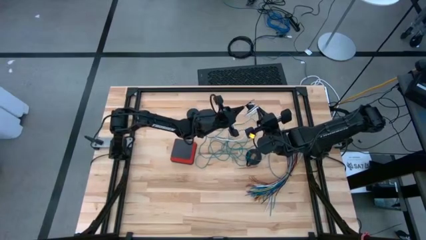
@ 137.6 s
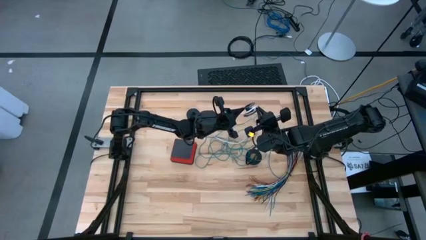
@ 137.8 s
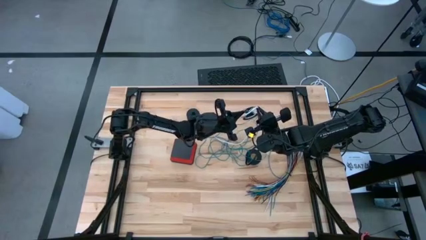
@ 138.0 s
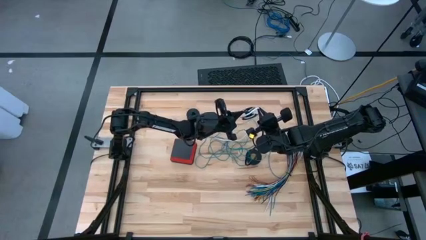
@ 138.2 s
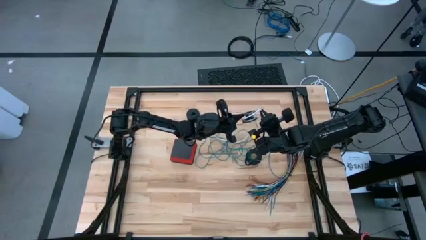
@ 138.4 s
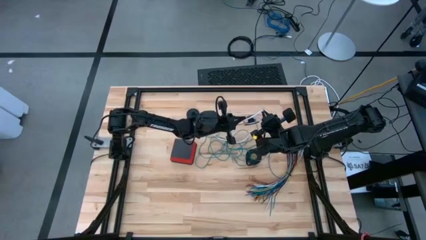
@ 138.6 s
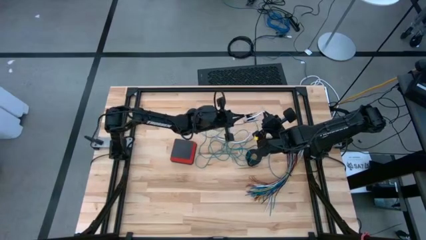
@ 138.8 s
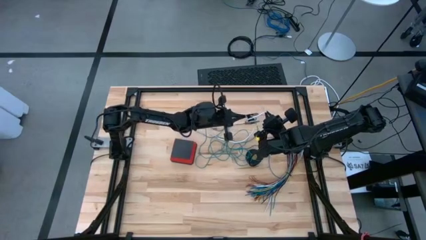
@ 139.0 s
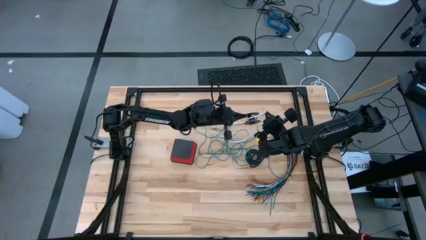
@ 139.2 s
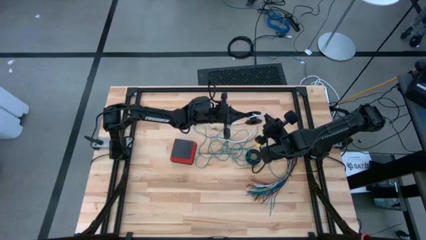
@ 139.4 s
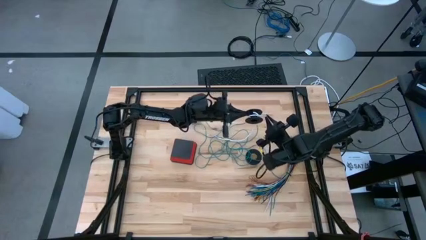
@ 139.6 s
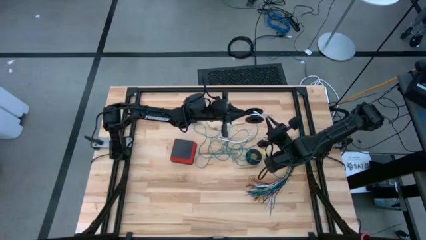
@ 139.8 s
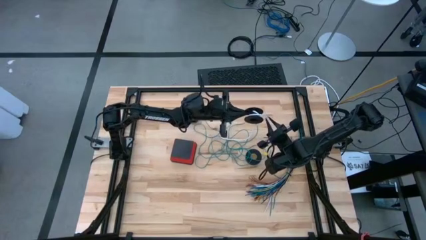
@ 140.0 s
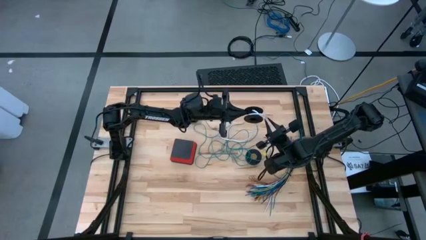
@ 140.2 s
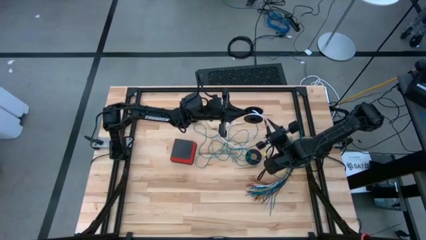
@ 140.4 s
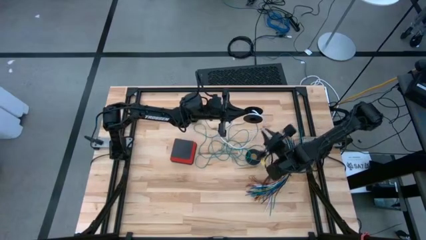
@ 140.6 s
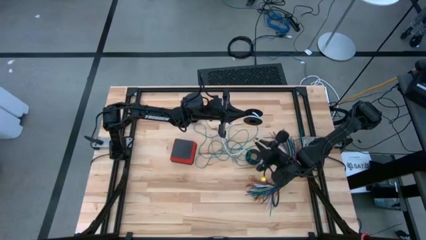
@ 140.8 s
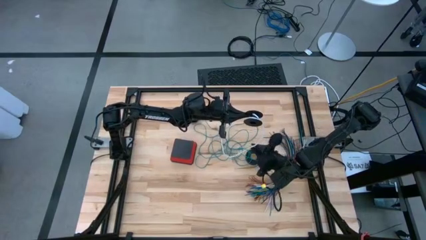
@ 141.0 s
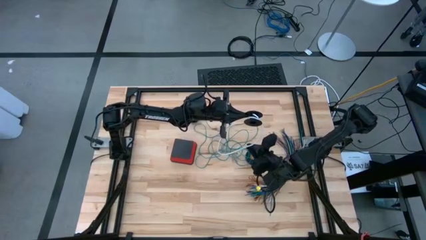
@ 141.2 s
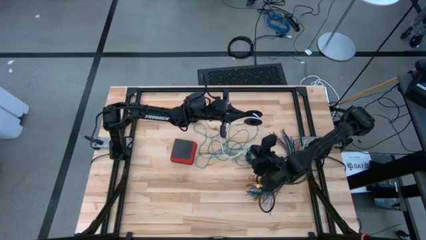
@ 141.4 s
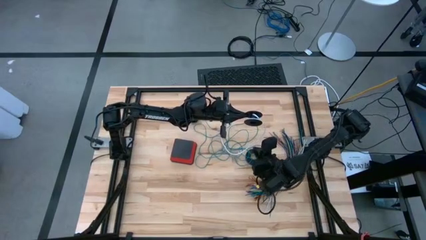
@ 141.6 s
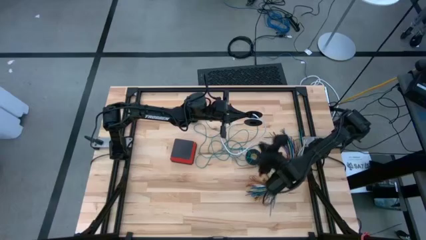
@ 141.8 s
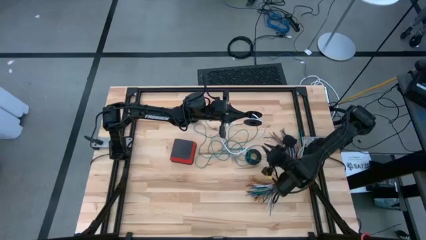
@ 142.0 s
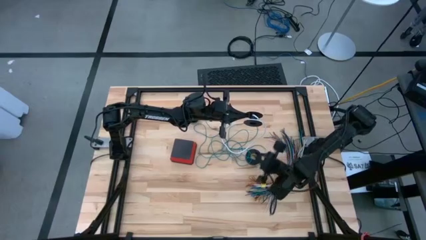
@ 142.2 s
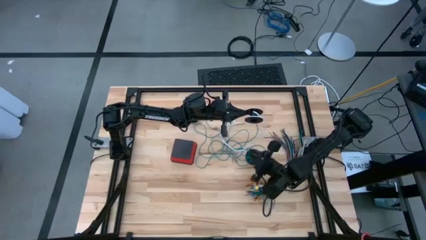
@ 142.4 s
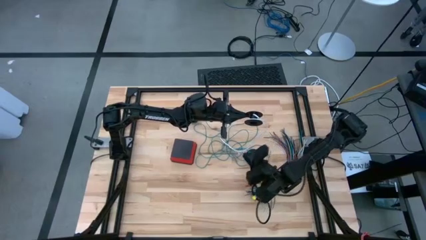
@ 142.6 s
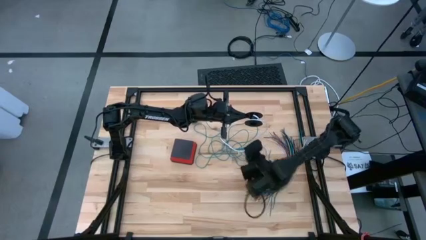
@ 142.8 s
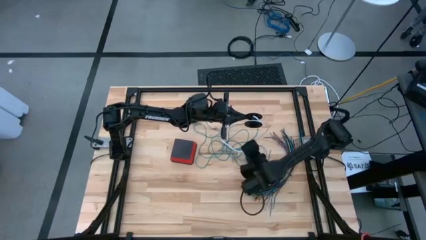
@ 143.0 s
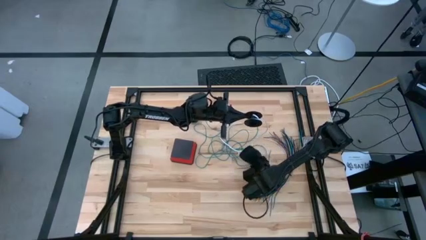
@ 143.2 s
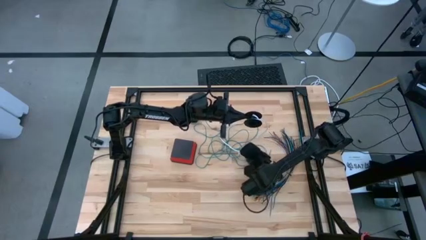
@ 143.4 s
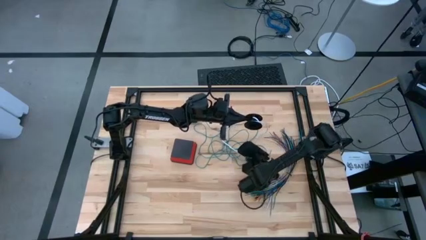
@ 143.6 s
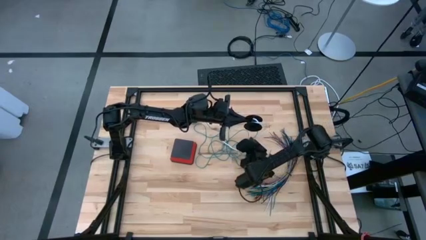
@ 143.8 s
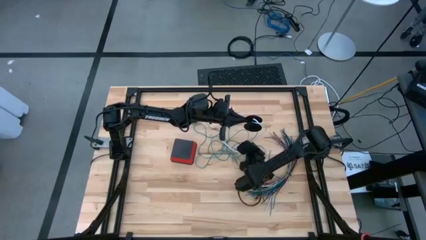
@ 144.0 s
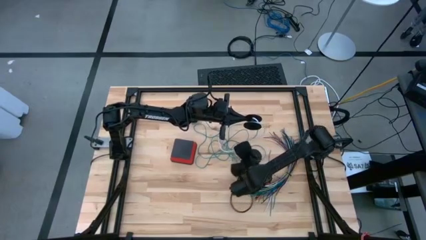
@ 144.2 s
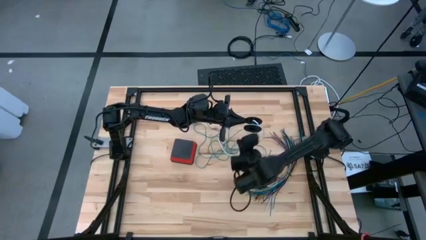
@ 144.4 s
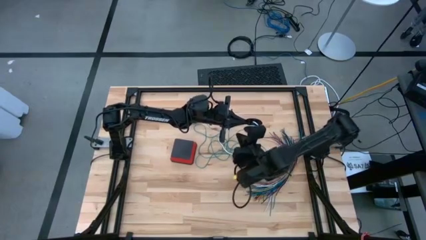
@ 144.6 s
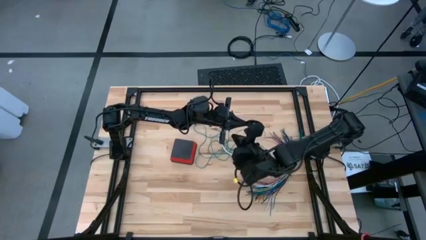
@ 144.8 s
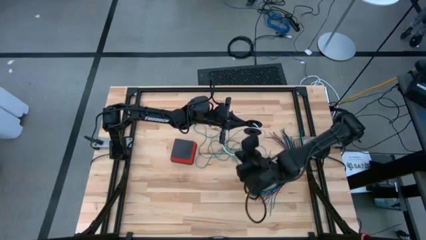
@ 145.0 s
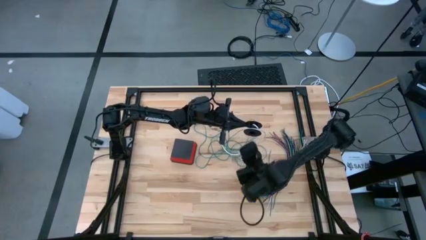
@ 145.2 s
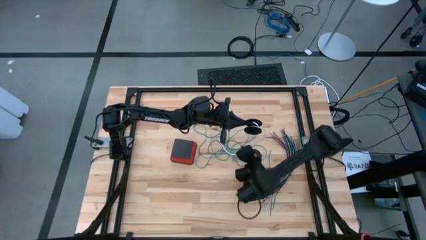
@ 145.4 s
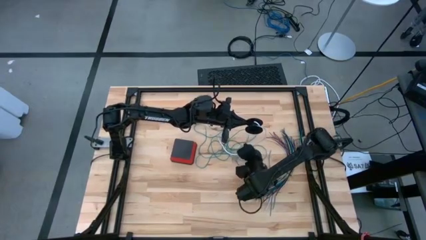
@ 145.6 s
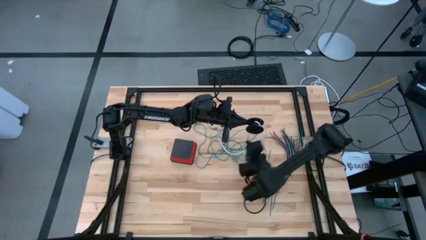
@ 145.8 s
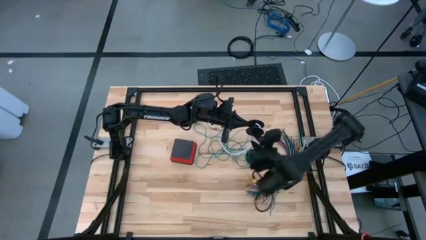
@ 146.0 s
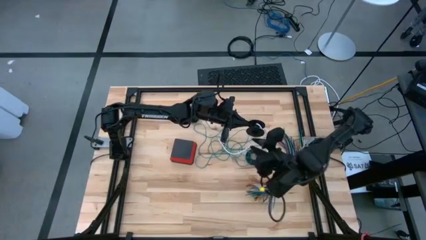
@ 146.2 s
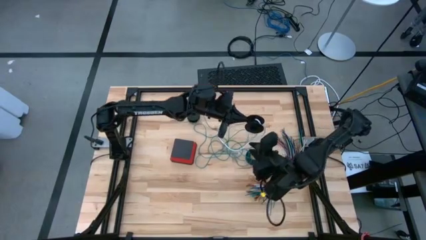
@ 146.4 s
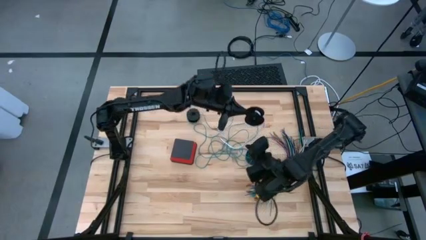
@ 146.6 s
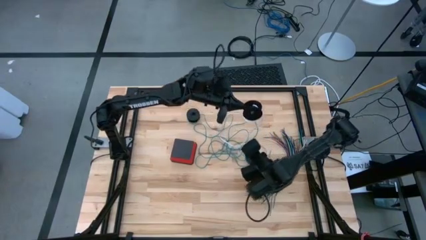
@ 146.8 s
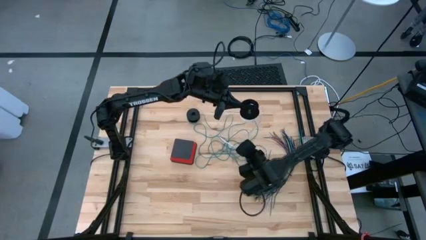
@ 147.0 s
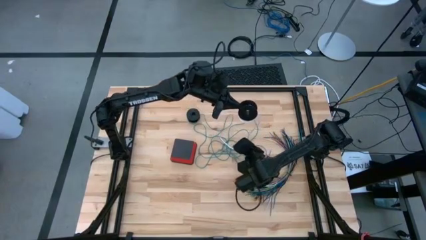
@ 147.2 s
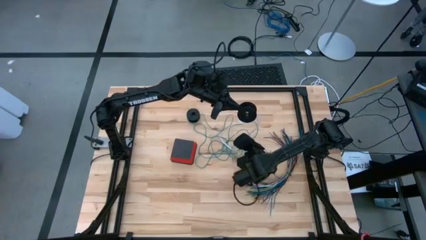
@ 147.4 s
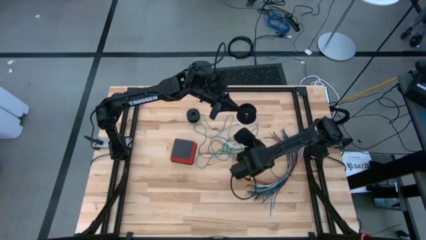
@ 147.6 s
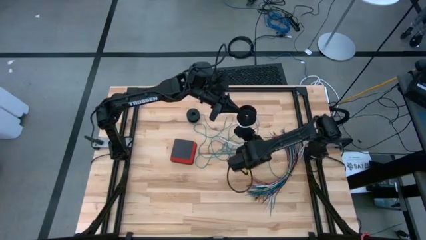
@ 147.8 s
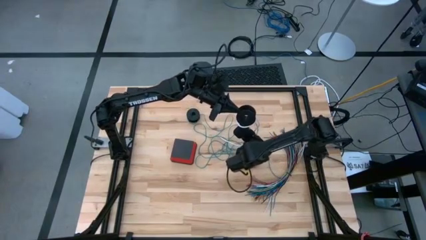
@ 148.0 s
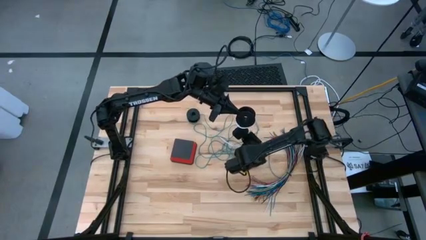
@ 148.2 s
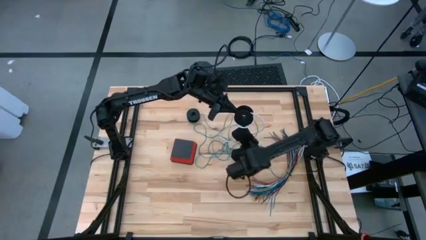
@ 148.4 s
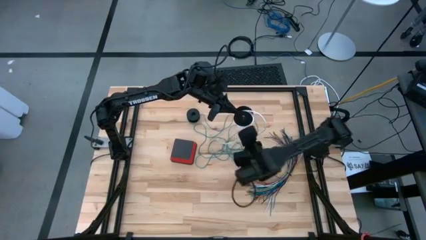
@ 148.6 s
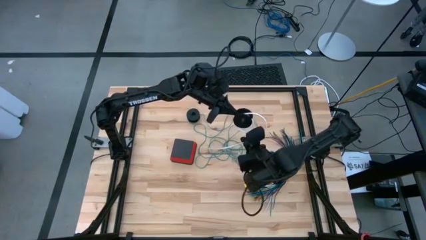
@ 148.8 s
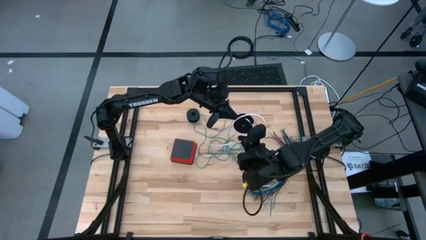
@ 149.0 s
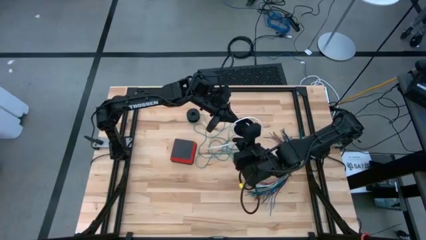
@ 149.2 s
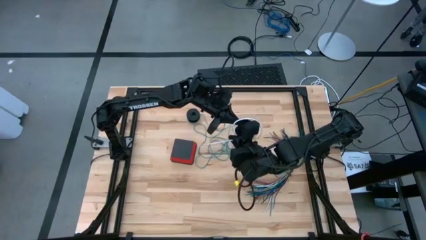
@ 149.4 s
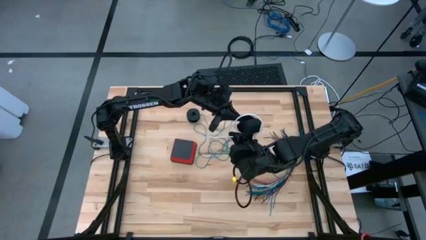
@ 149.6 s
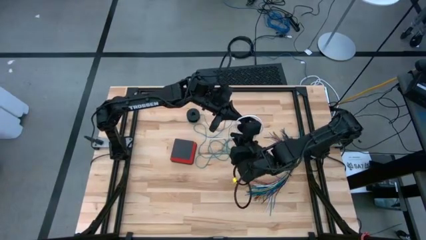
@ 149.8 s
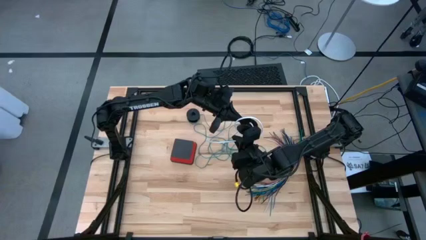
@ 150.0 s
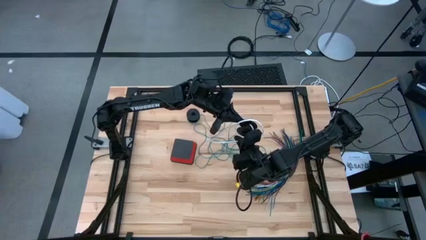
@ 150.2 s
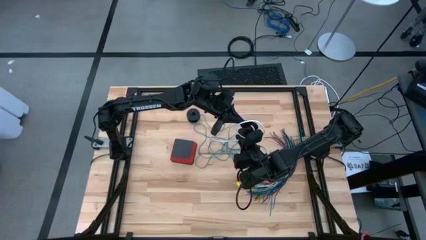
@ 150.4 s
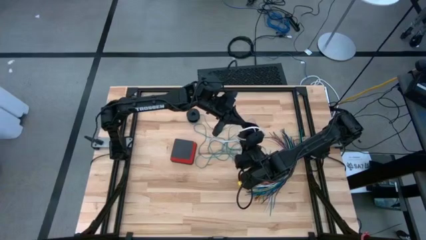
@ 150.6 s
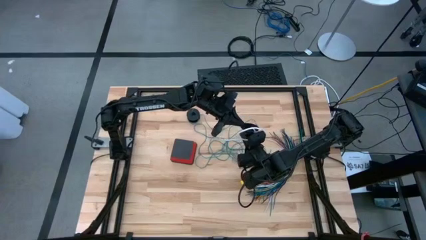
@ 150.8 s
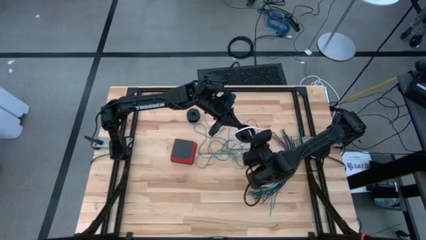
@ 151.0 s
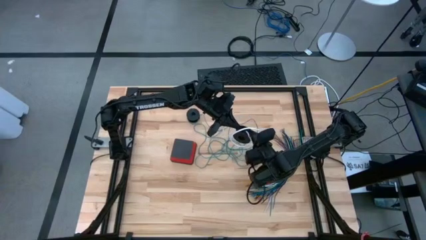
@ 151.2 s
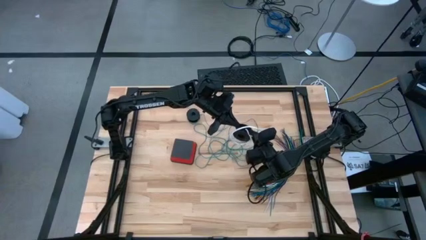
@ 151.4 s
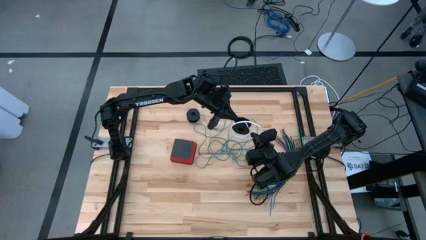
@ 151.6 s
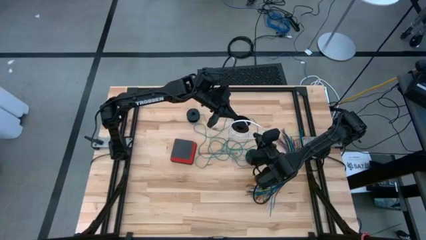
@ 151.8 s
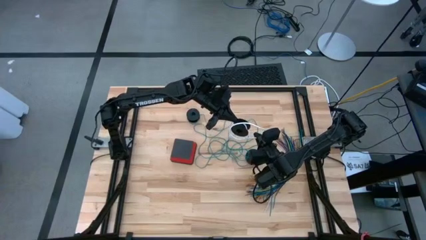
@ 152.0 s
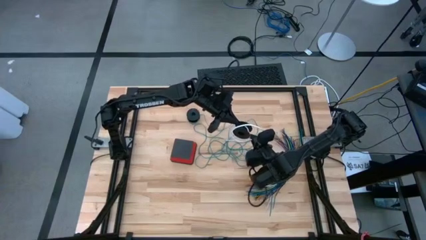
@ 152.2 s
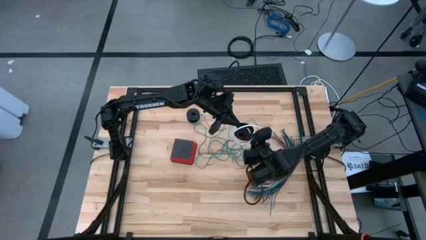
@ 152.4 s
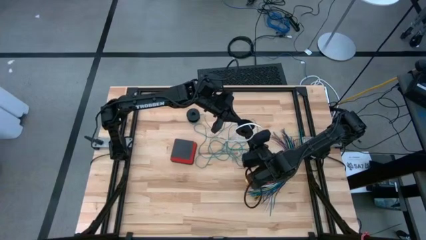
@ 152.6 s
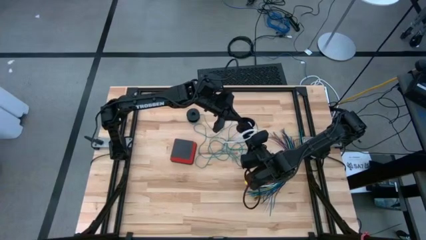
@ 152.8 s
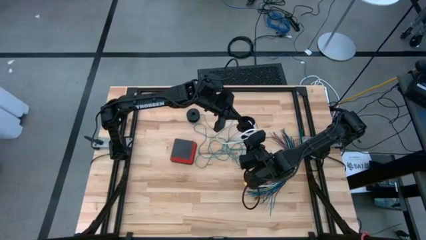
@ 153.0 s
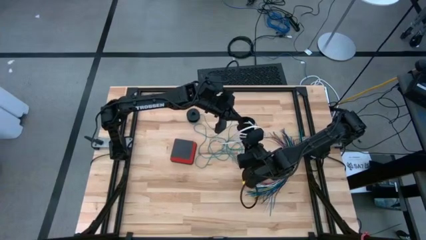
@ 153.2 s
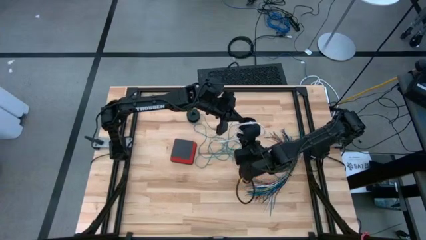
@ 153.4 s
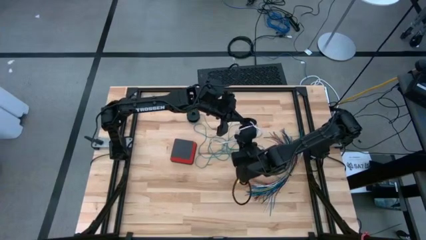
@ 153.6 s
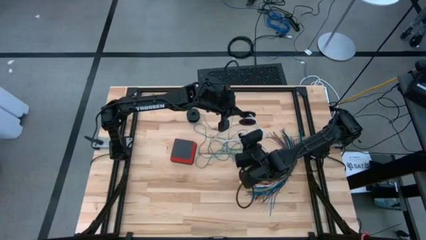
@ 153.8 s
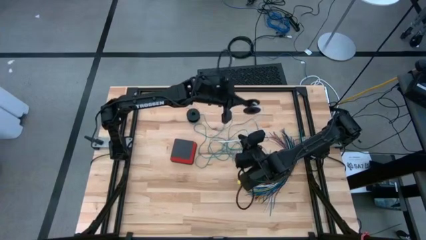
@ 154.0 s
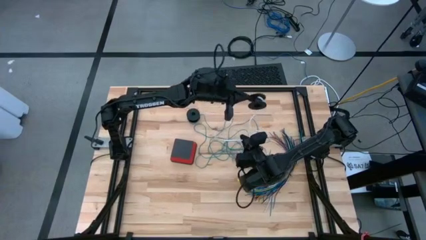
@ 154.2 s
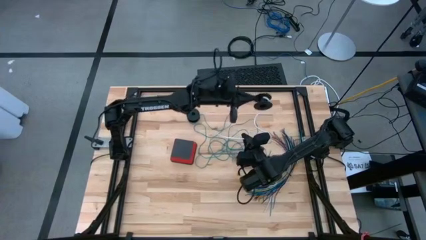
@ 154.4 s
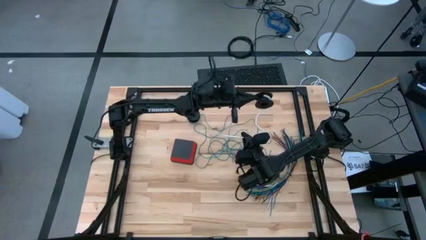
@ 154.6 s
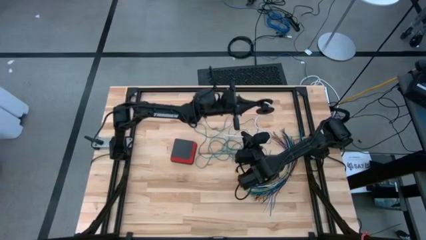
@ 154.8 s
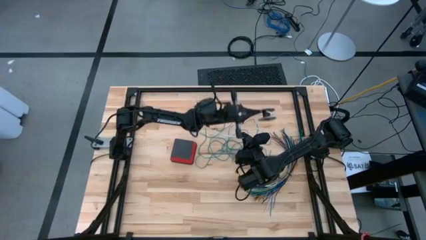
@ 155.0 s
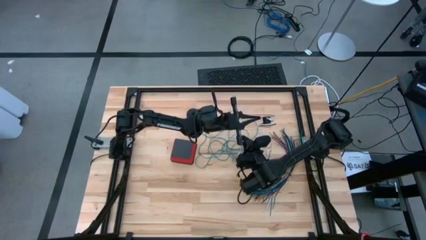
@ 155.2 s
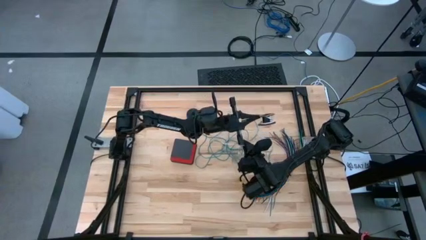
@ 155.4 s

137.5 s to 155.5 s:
Task: Coiling cords
Coil the white wire cable on the spool
